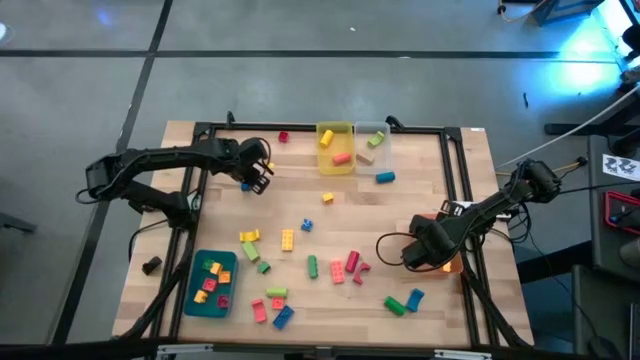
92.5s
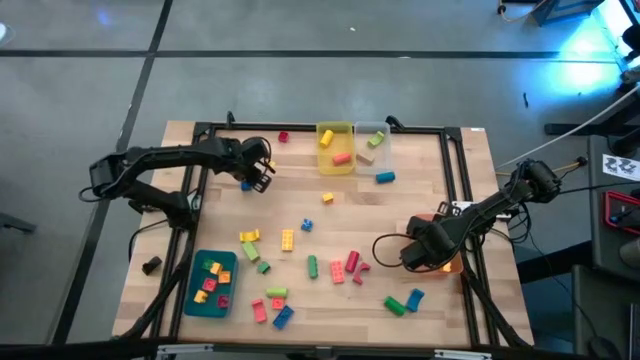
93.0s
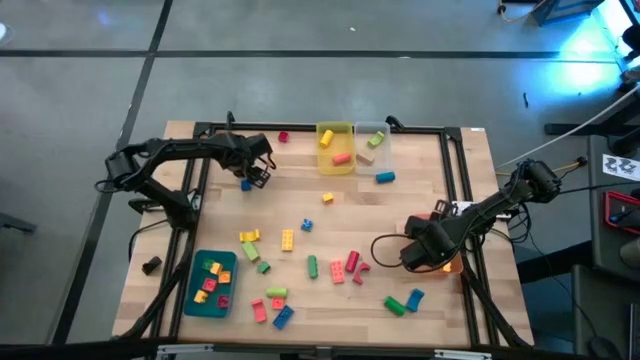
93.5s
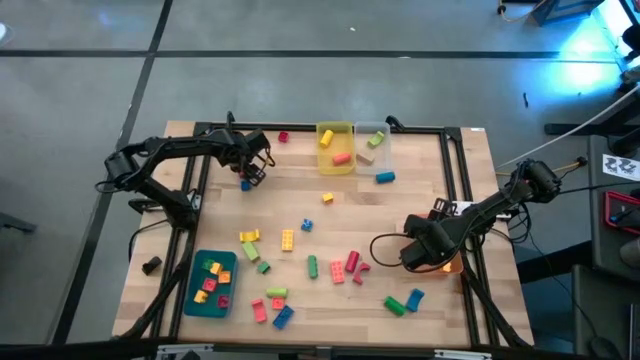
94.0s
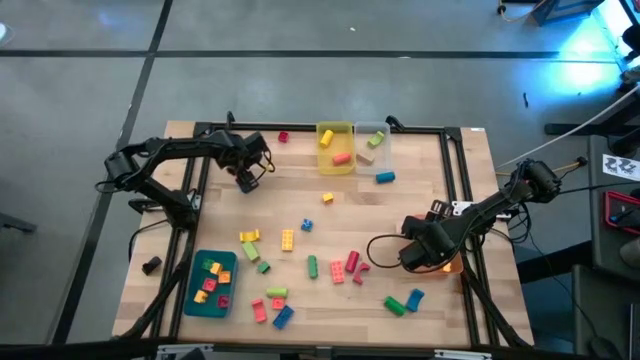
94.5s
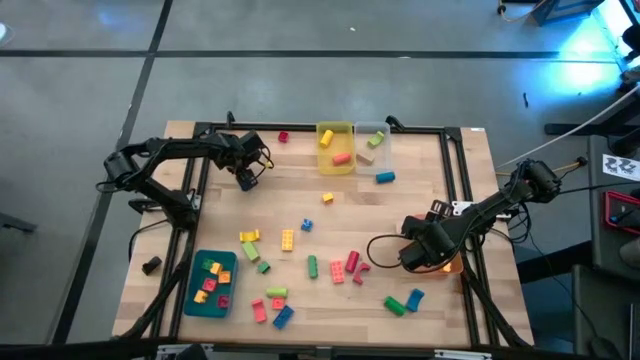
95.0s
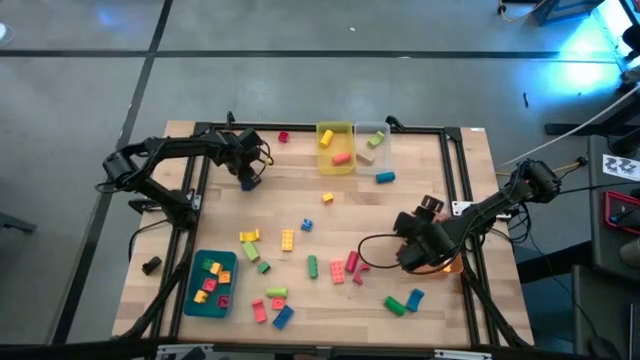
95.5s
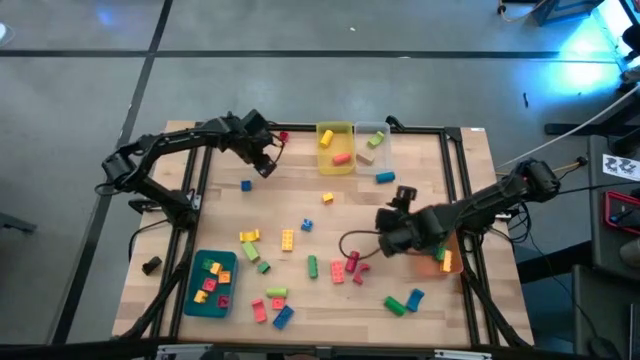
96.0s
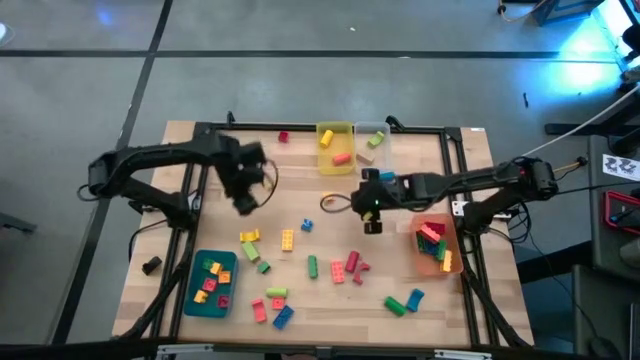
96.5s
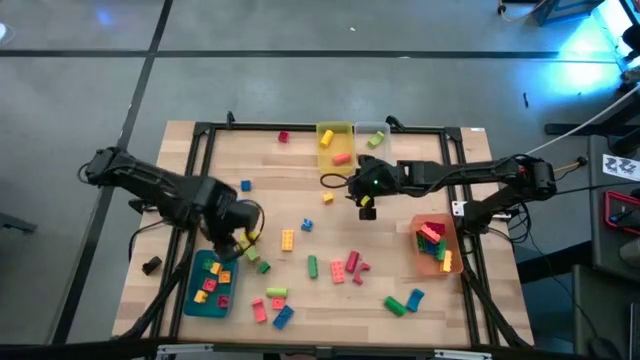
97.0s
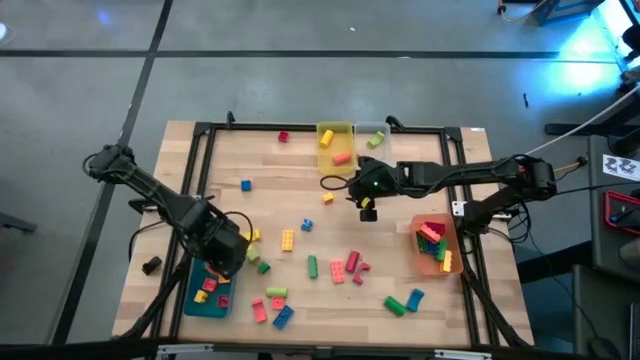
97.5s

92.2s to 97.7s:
Task: Sort blocks by size
Put the orange square game piece into the blue bin

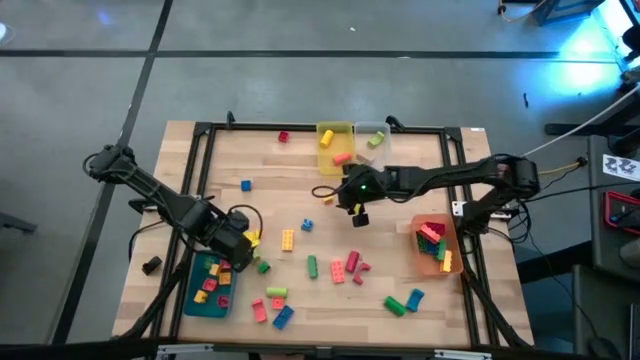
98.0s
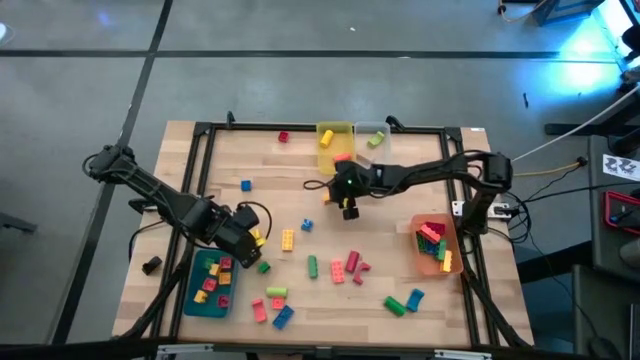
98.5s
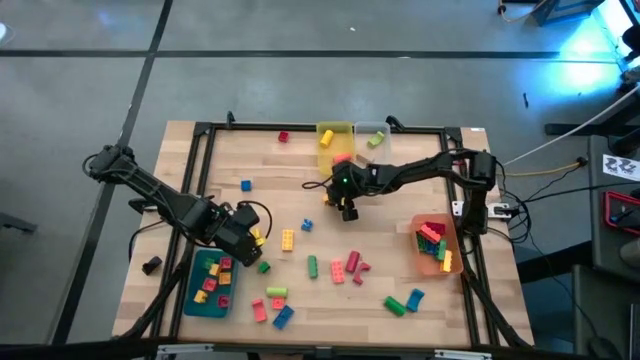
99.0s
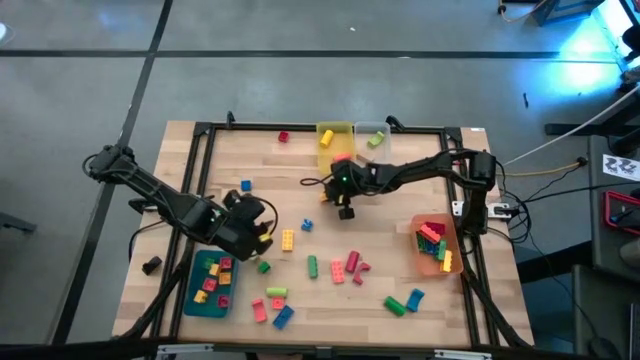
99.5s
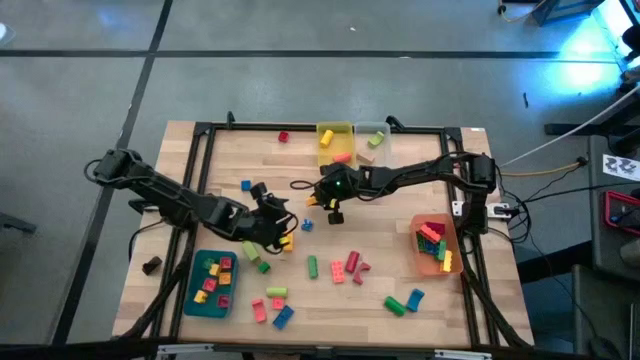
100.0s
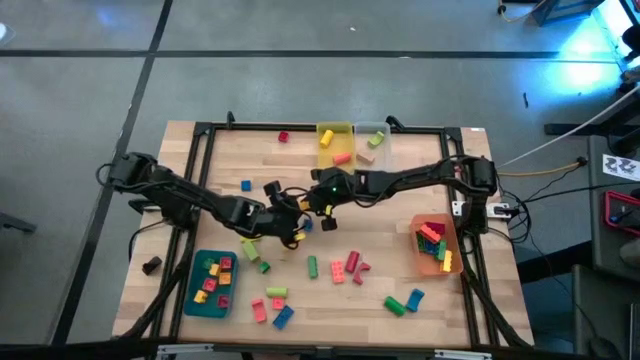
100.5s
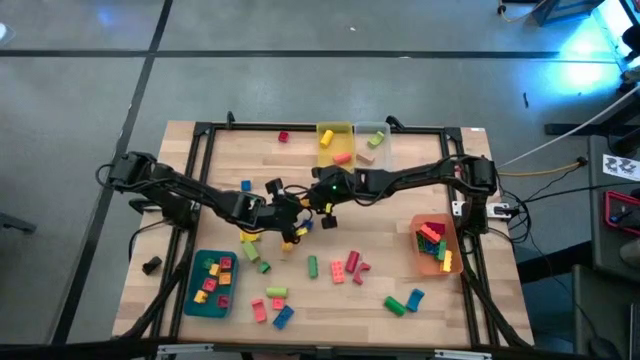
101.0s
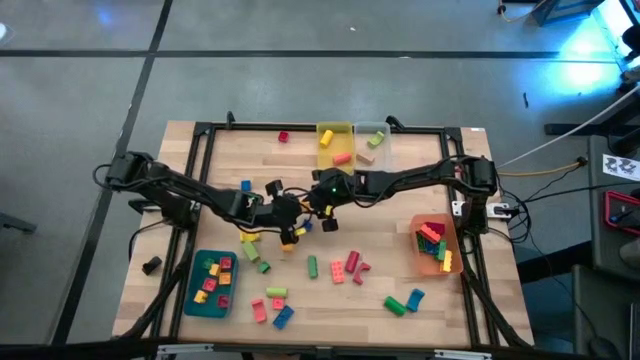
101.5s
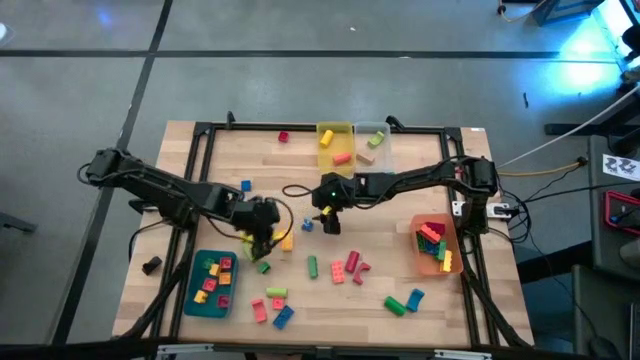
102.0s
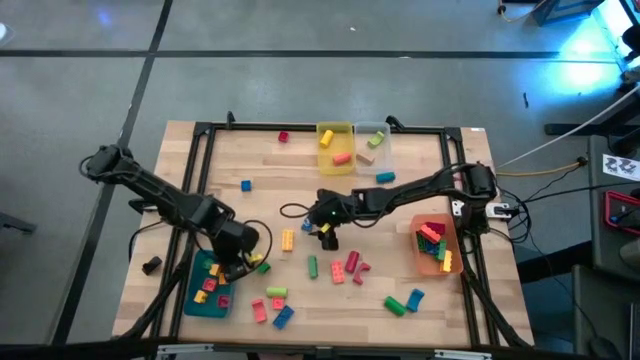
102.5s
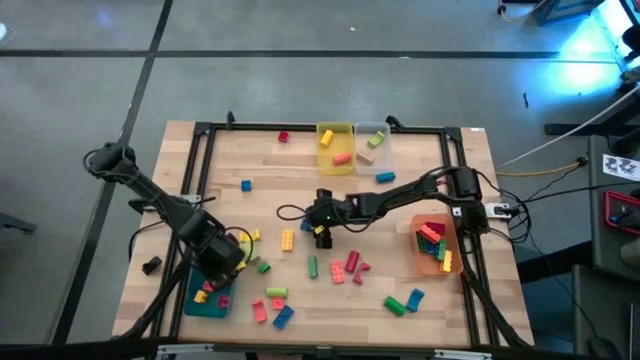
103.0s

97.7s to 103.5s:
Put the yellow square game piece into the blue bin

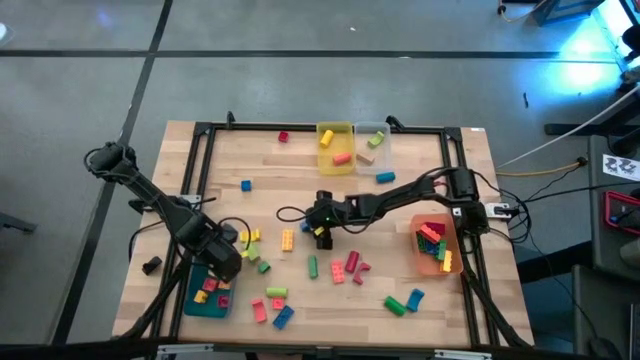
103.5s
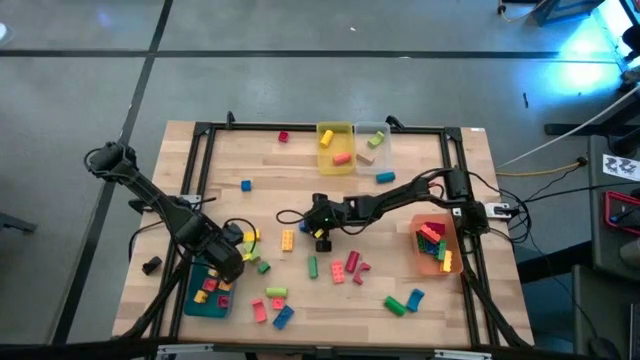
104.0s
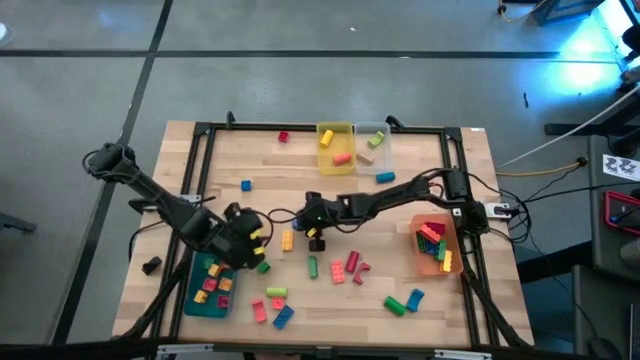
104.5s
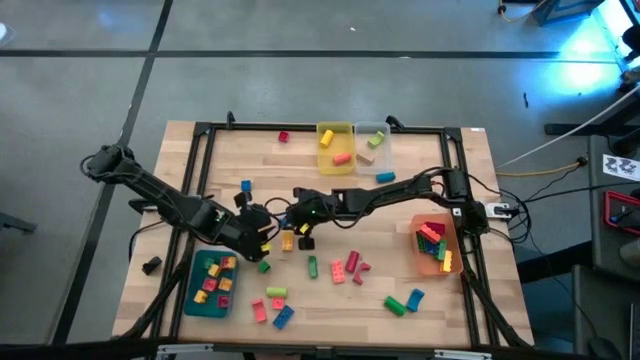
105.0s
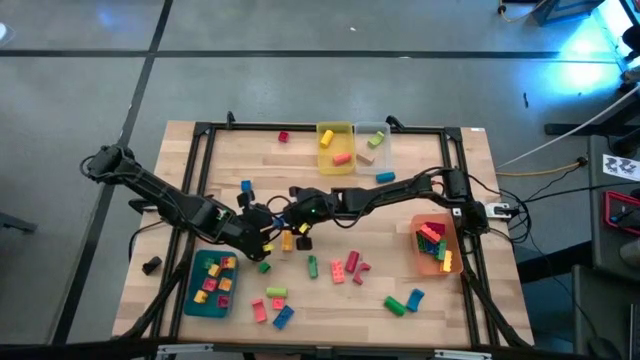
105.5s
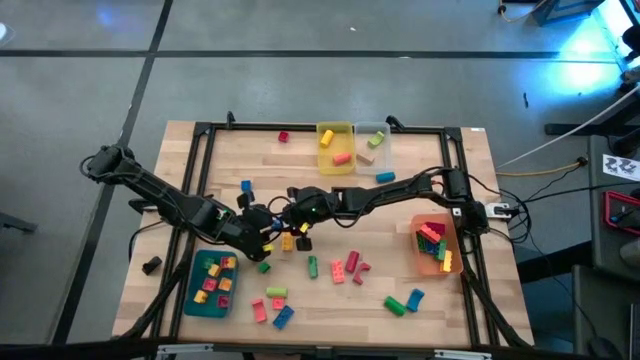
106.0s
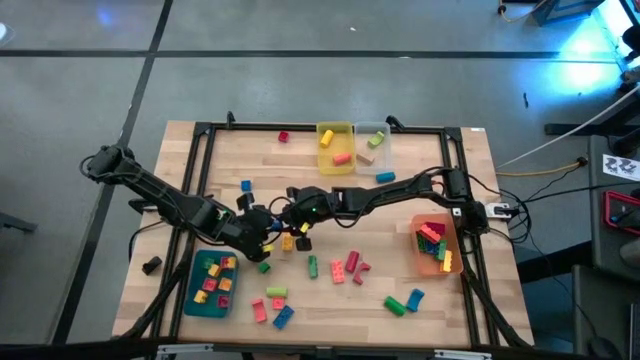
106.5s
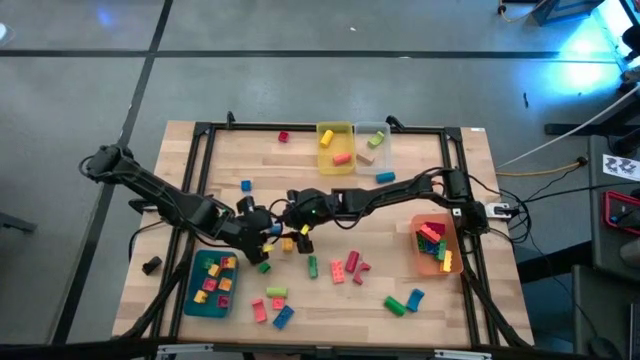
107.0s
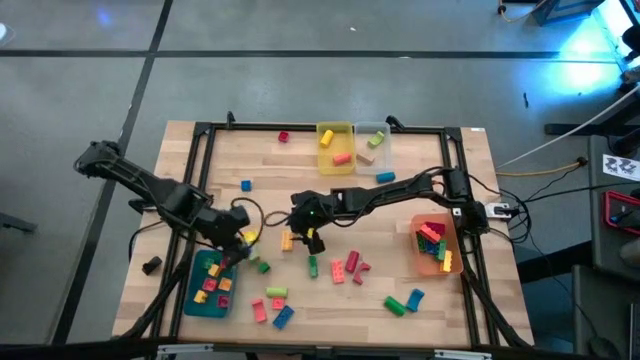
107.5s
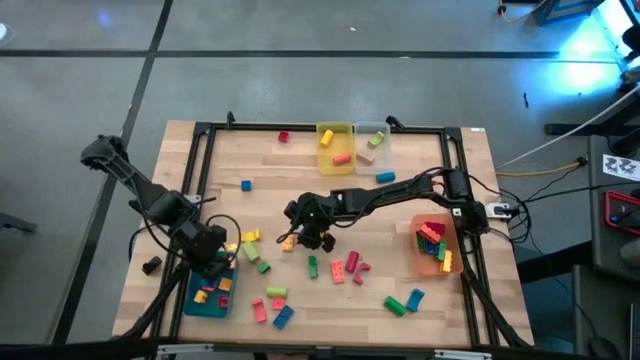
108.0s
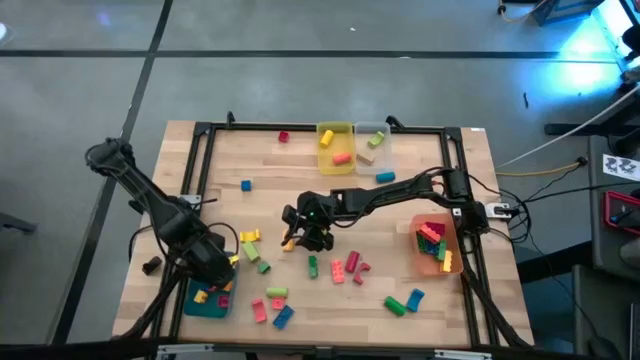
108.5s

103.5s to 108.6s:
Put the blue square game piece into the blue bin

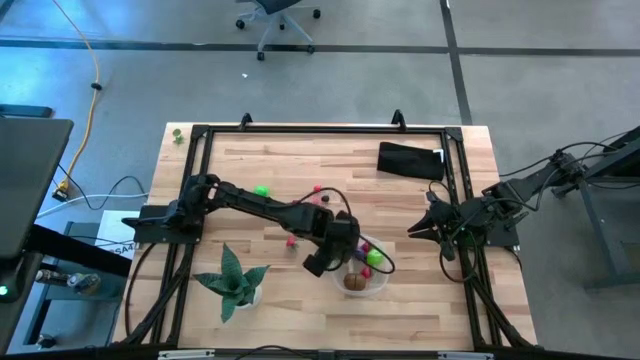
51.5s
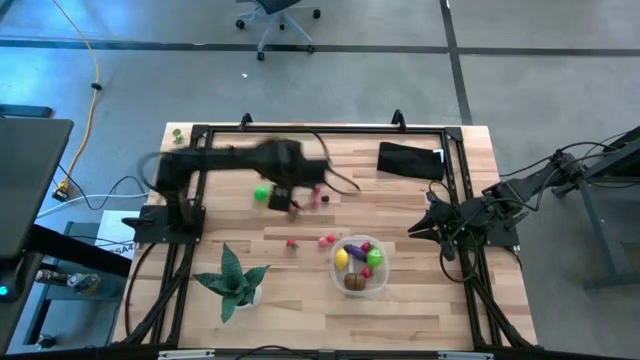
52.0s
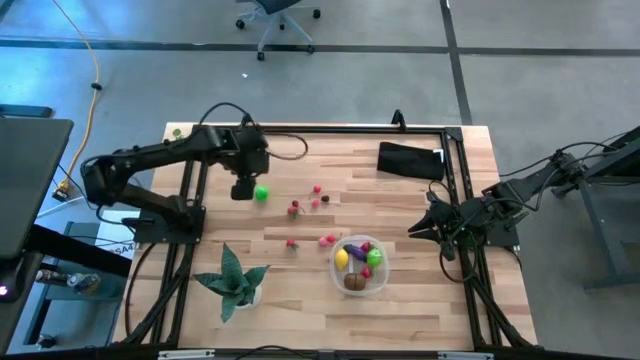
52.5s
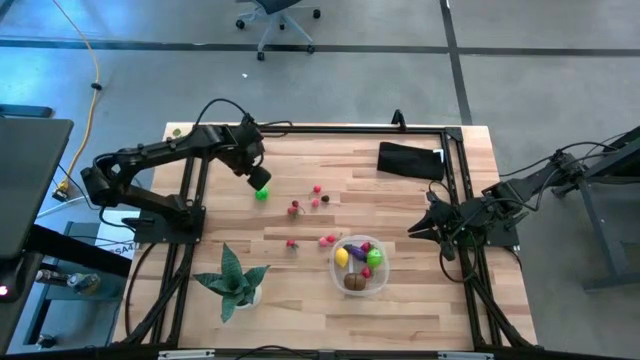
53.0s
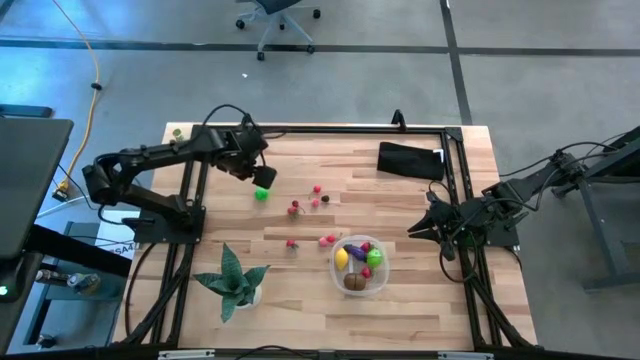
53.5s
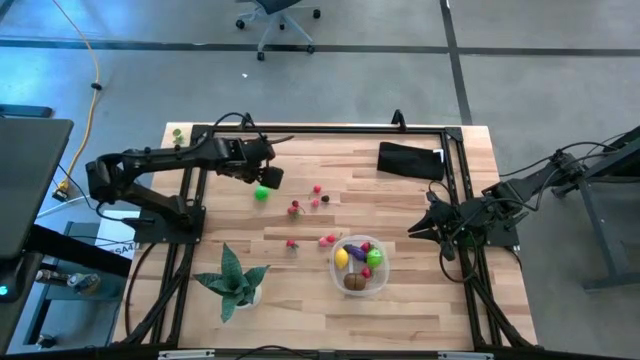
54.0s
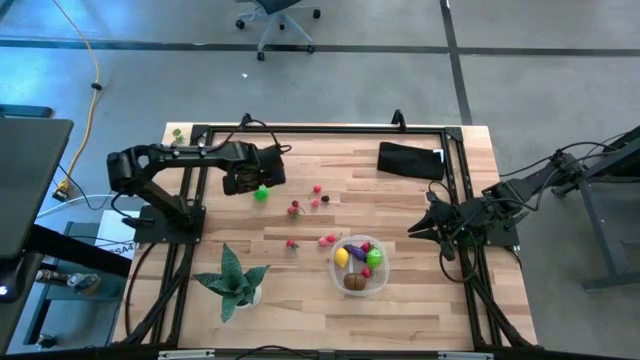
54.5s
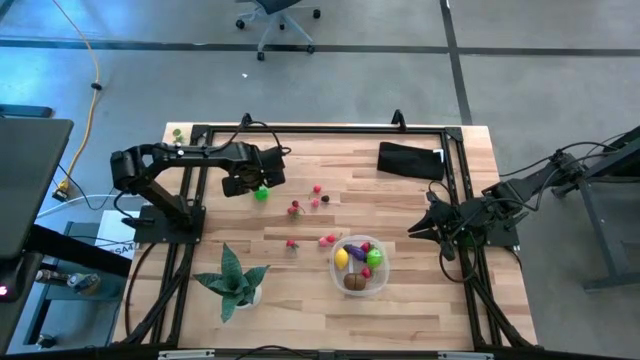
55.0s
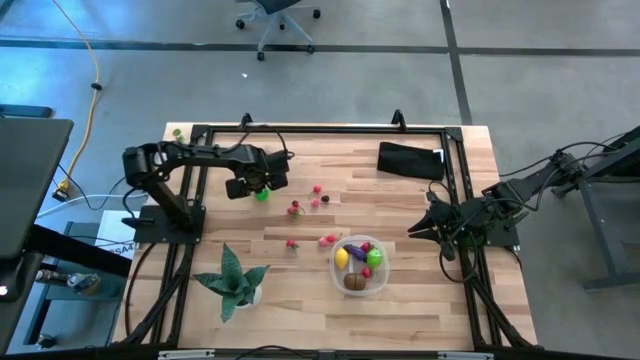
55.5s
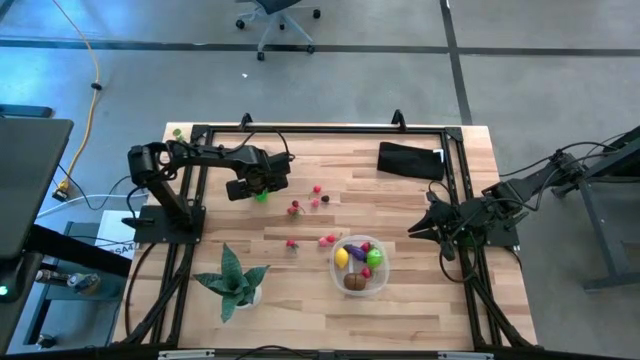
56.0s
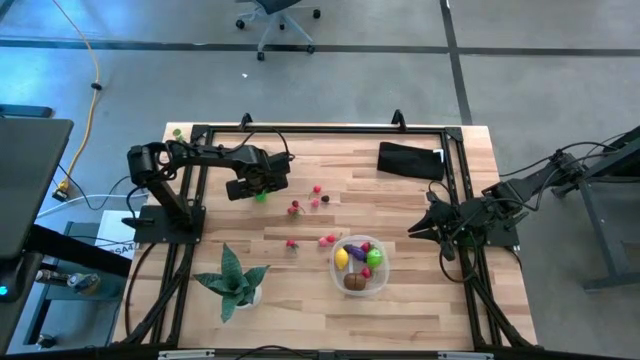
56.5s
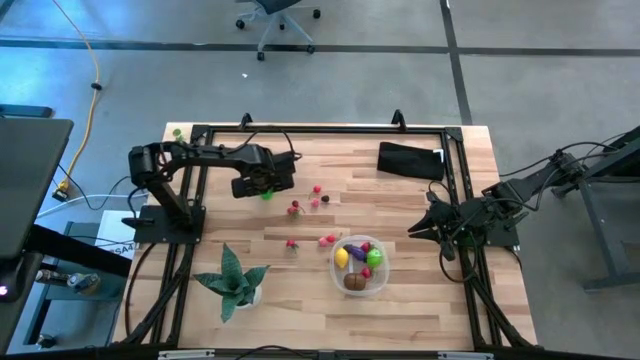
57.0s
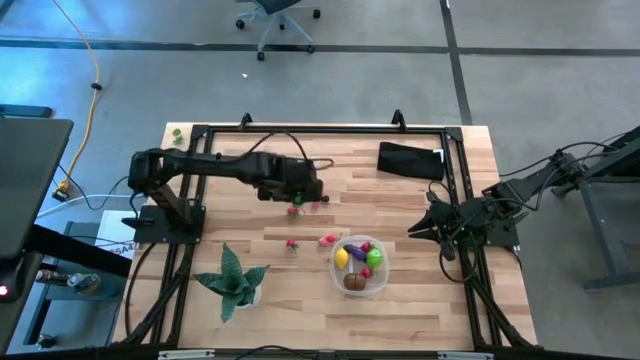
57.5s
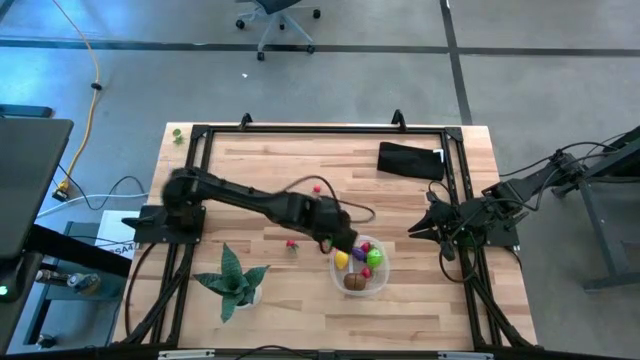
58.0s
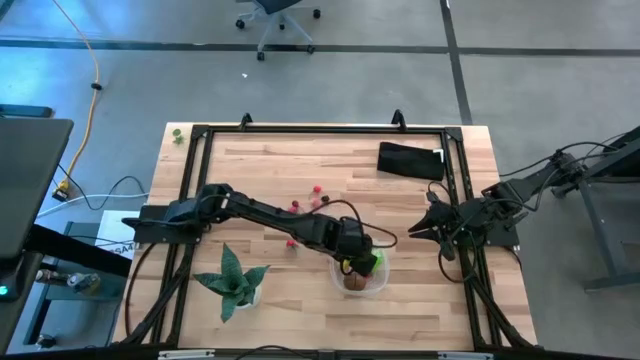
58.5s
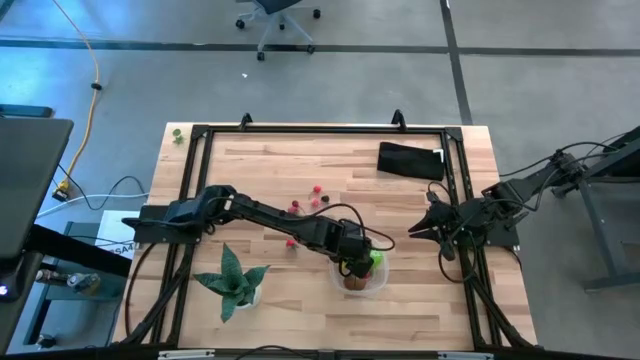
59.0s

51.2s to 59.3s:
Task: Pick and placing Produce into tupperware
Put the pear into the transparent bin
